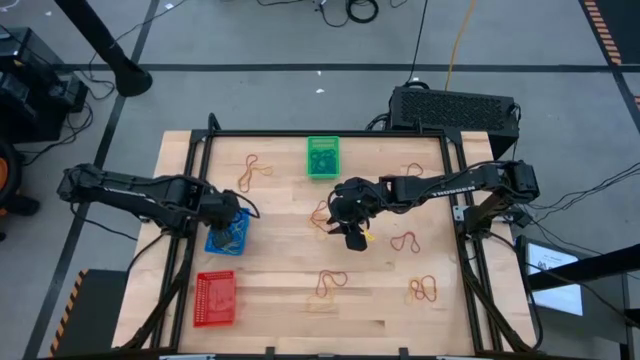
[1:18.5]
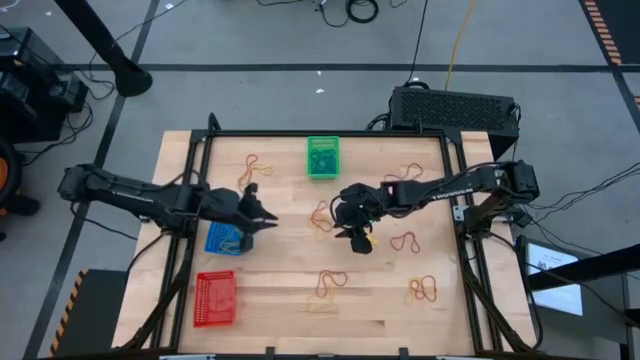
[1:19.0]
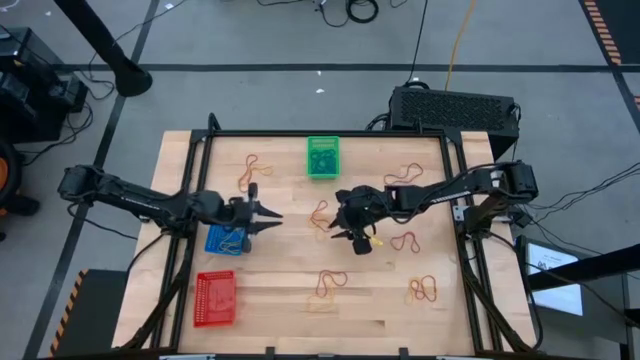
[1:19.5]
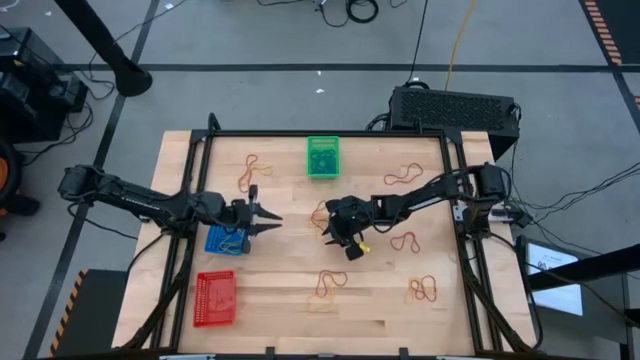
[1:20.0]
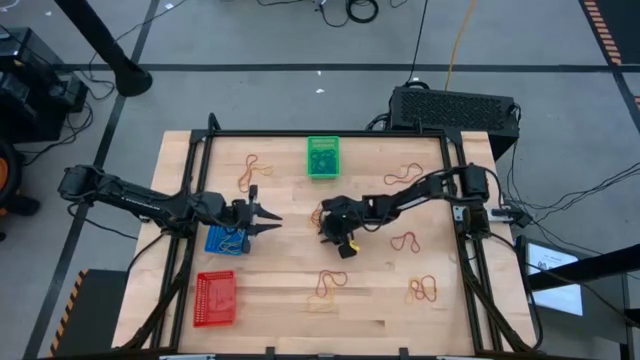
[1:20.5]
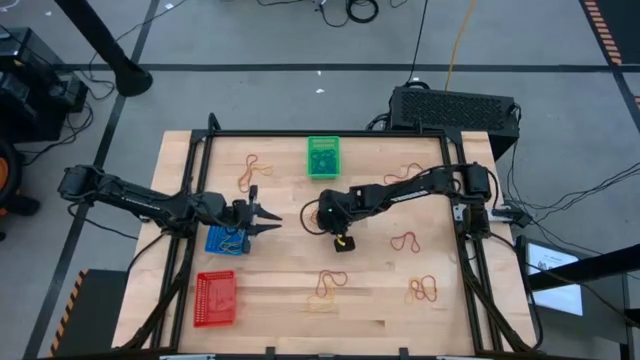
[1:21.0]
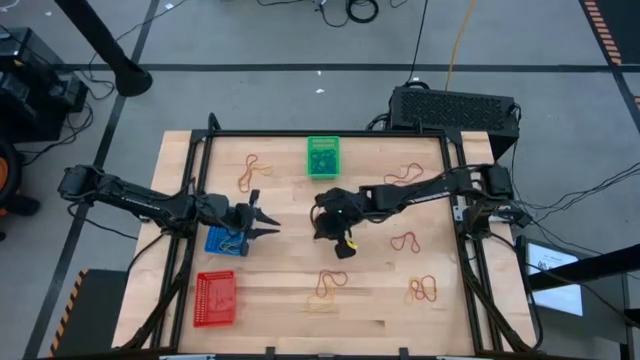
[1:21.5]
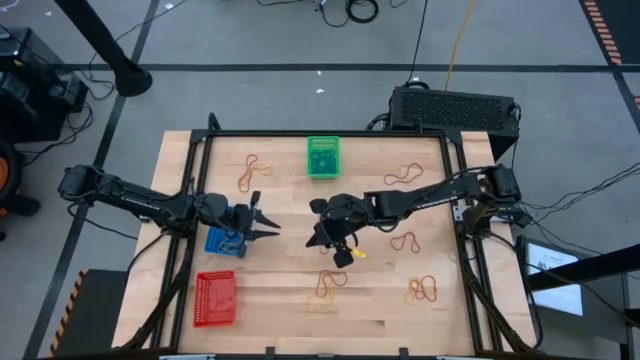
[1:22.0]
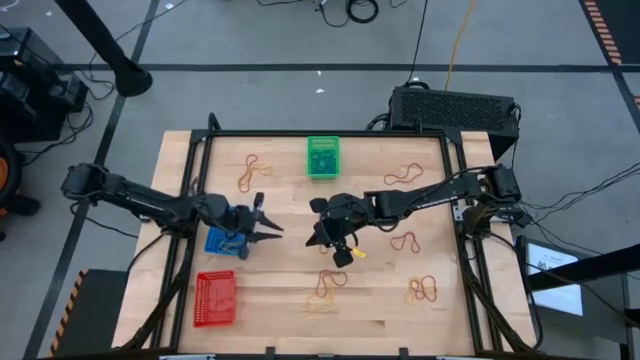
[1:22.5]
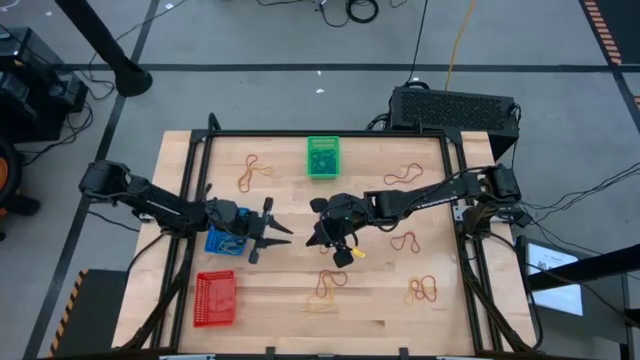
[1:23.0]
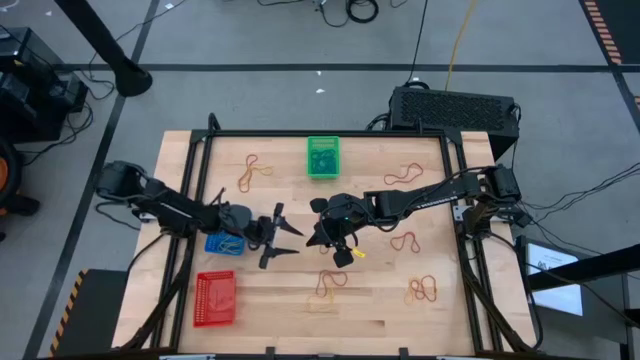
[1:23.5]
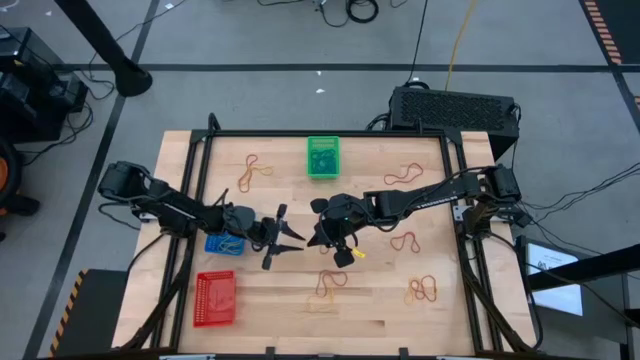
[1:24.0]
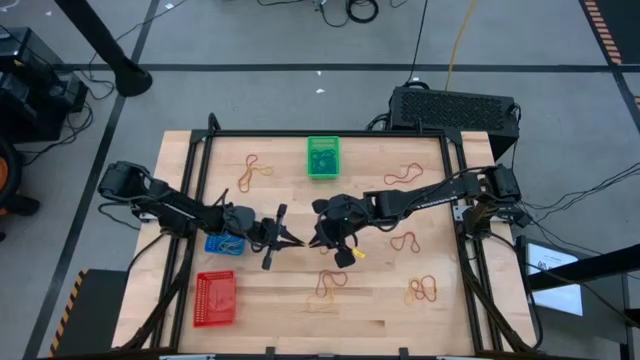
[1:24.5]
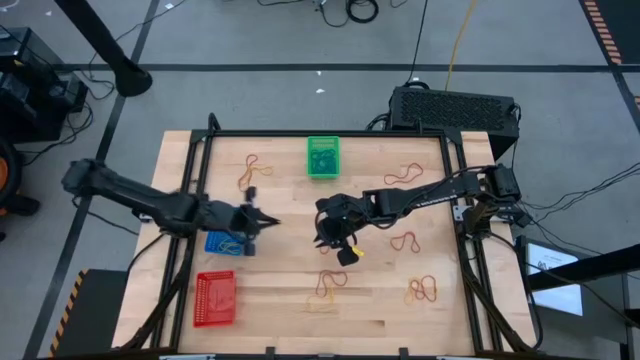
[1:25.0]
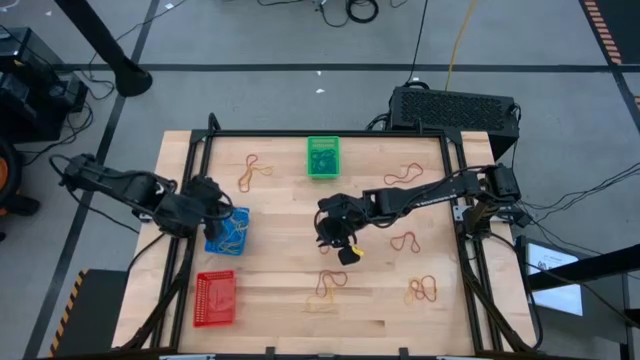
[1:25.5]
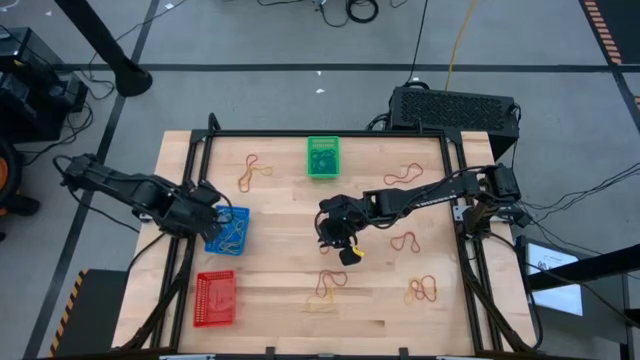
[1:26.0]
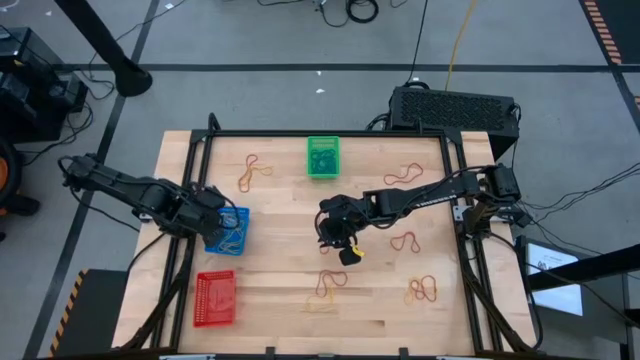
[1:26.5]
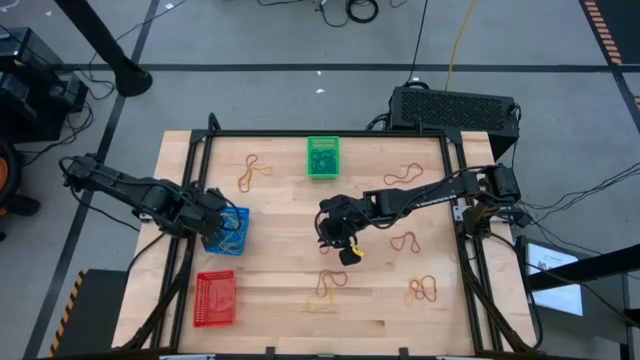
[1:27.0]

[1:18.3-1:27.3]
Task: Sort rubber bands into baskets
Put the yellow rubber band into the blue bin

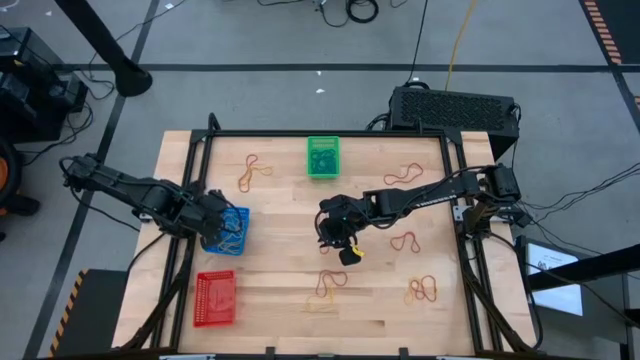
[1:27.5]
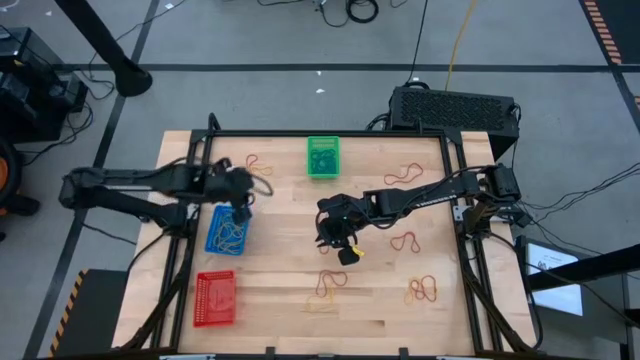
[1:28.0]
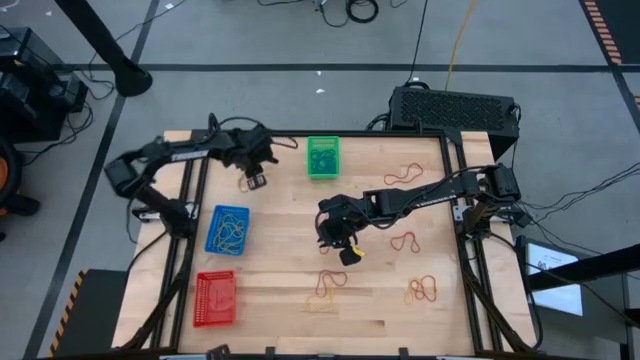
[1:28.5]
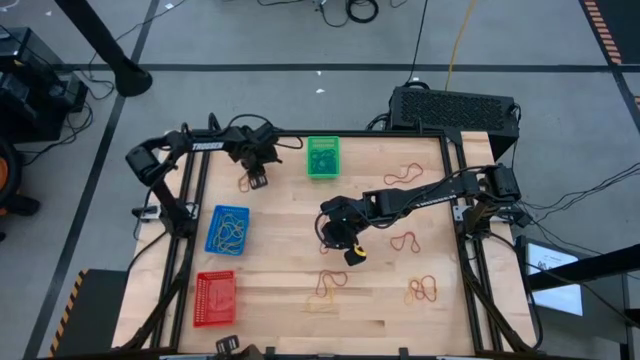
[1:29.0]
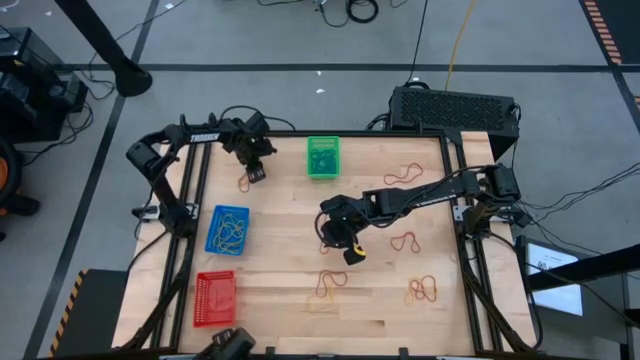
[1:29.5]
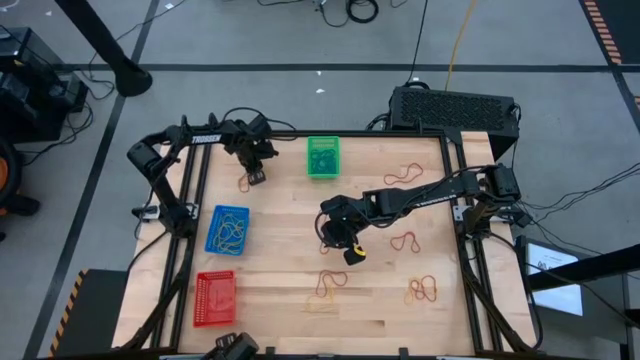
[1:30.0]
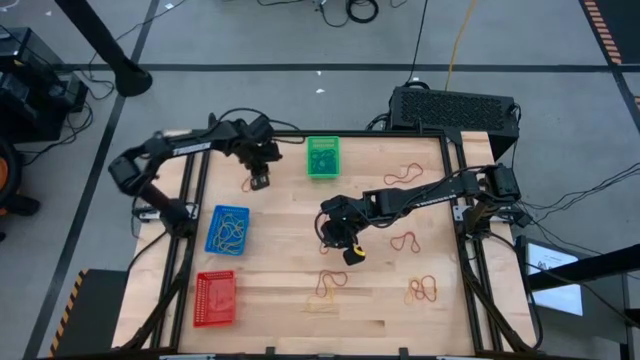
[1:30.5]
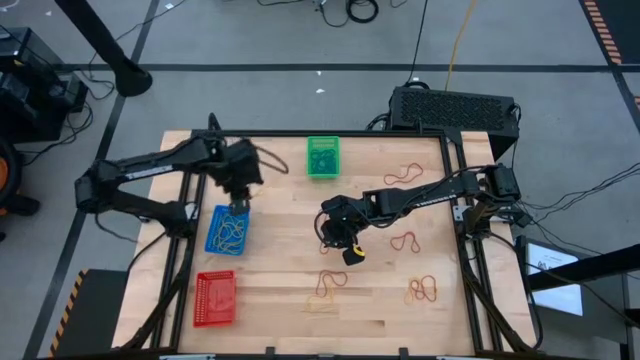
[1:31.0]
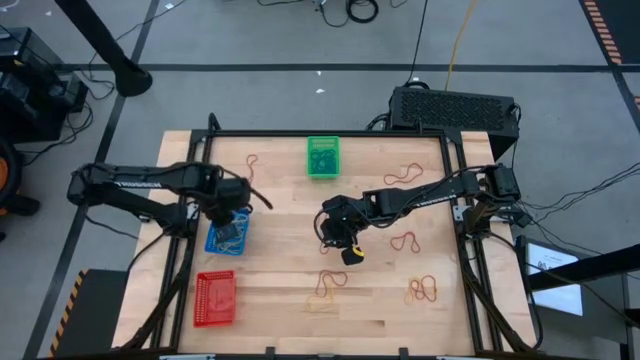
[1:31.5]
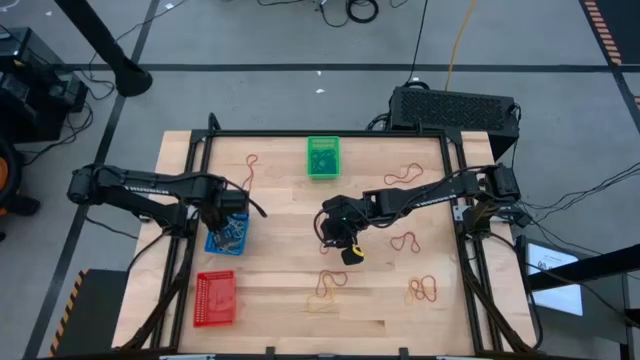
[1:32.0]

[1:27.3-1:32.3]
Put the yellow rubber band into the blue bin

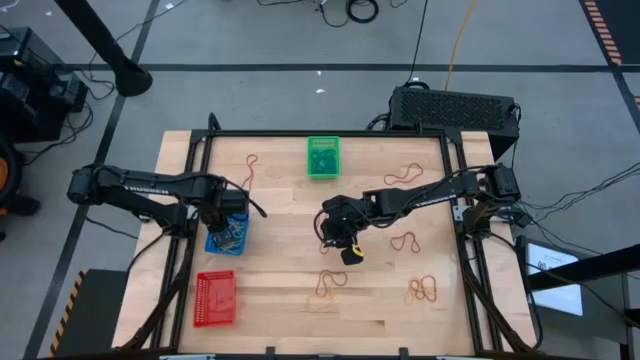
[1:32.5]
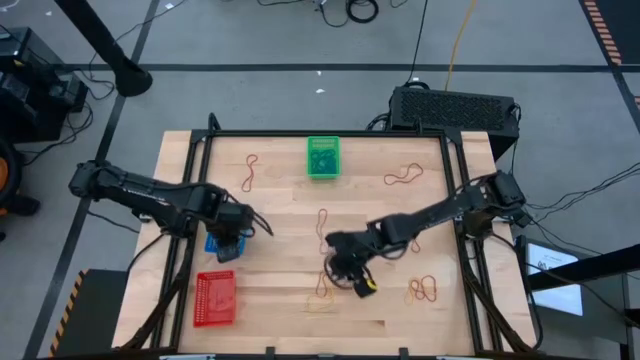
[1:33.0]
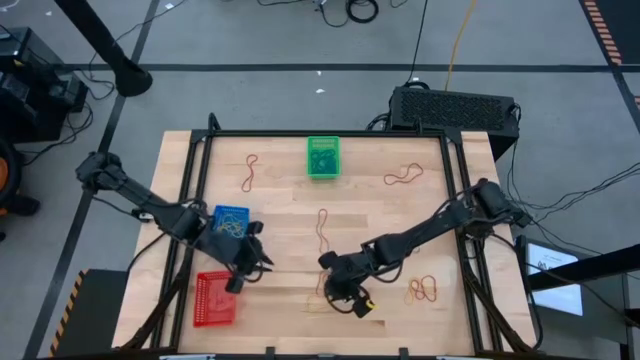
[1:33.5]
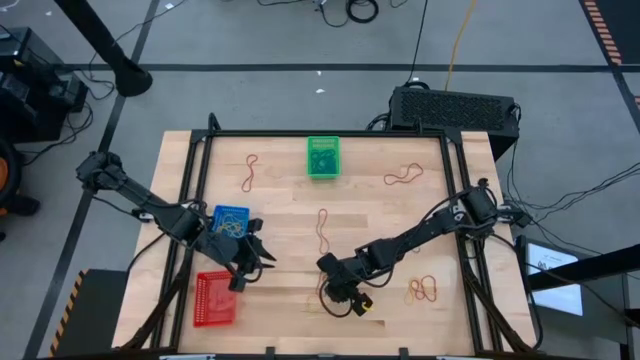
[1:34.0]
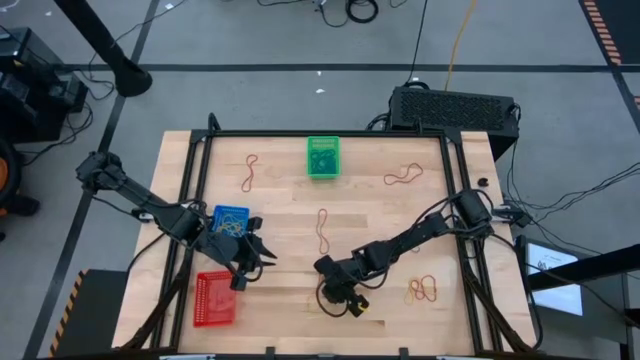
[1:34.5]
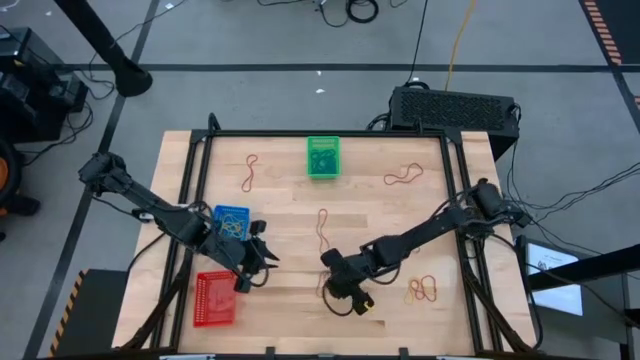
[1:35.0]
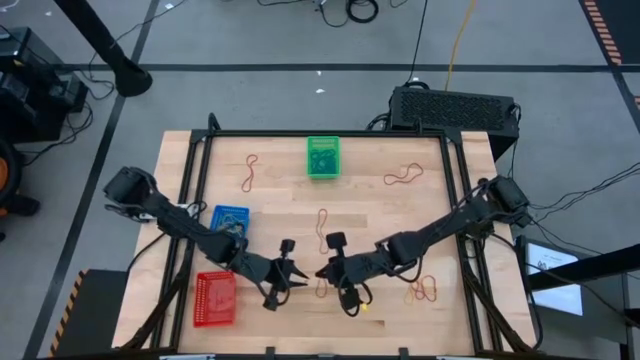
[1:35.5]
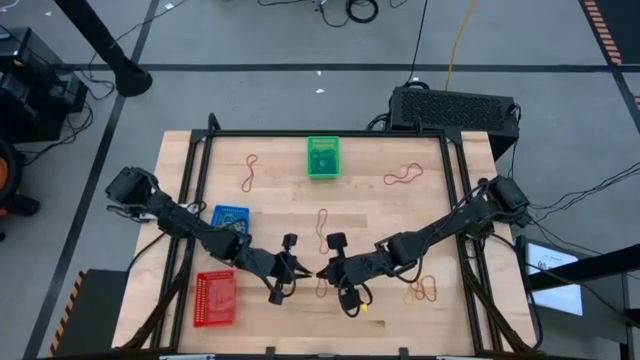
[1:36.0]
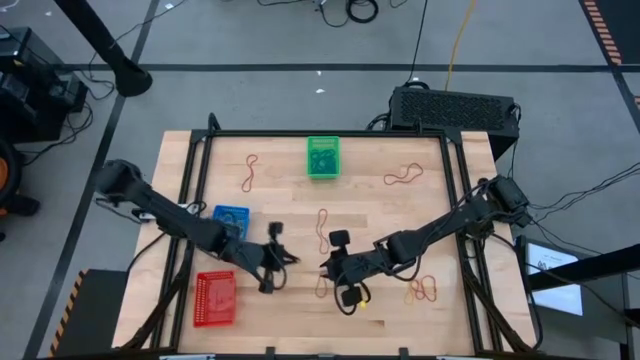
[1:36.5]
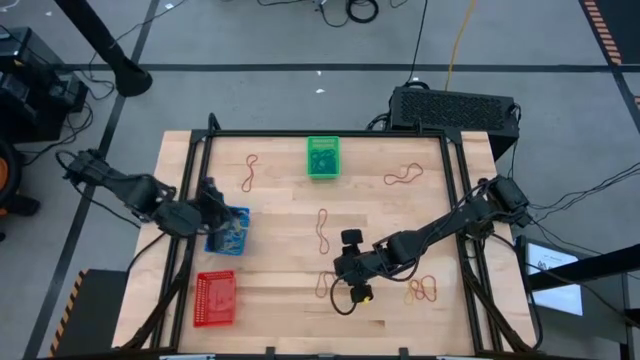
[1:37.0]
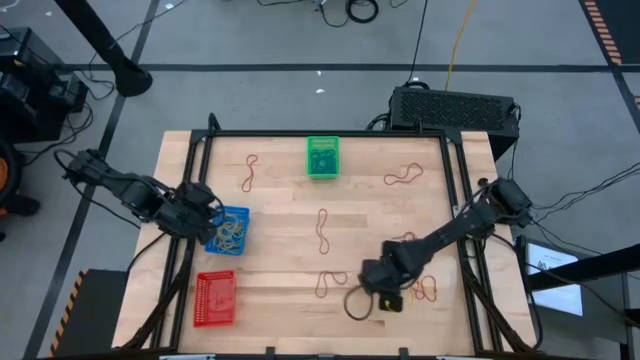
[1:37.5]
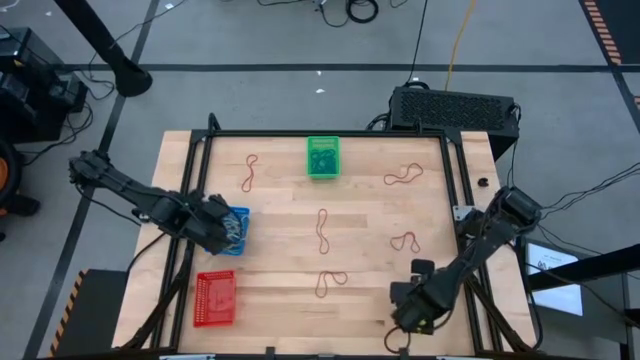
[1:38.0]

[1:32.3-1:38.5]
Put the yellow rubber band into the blue bin

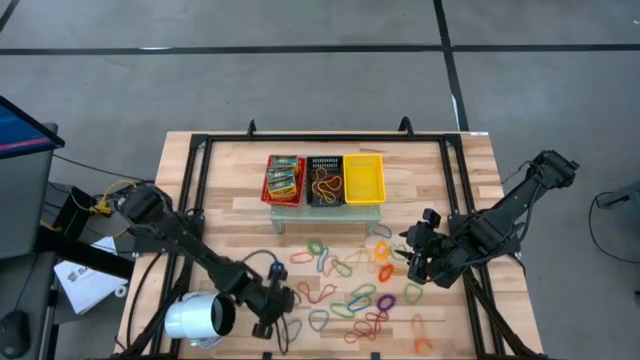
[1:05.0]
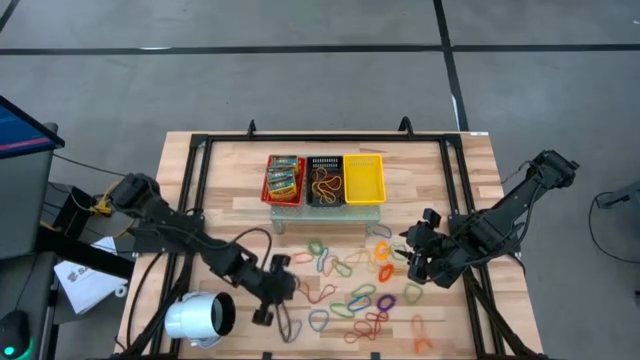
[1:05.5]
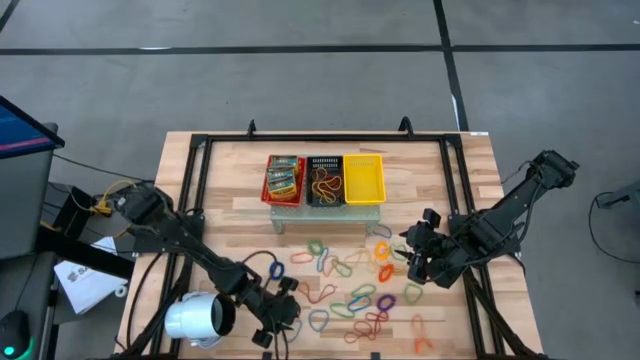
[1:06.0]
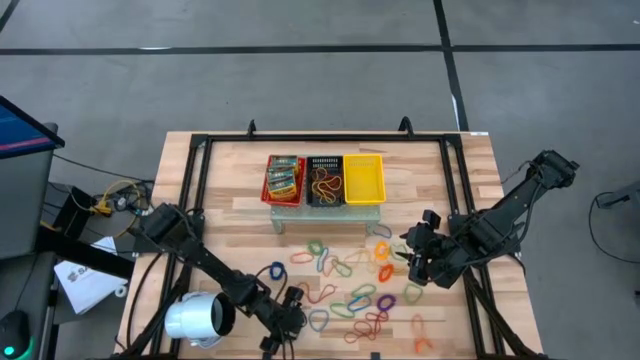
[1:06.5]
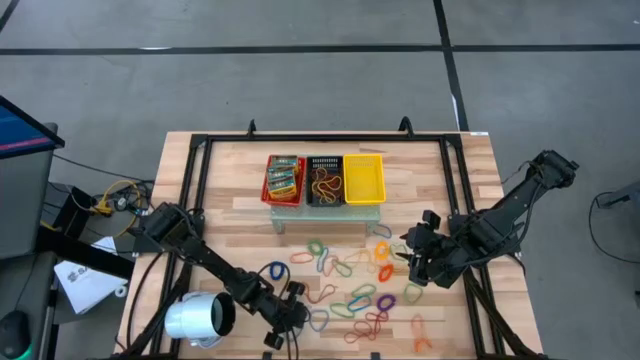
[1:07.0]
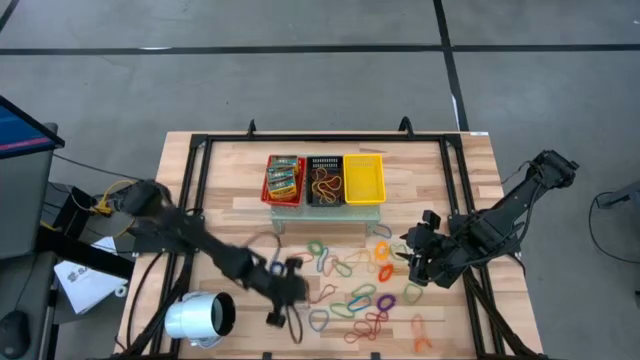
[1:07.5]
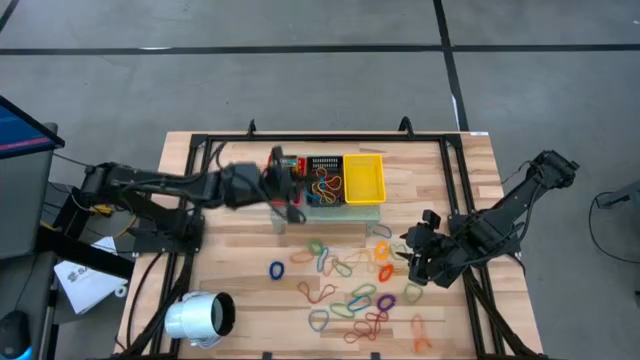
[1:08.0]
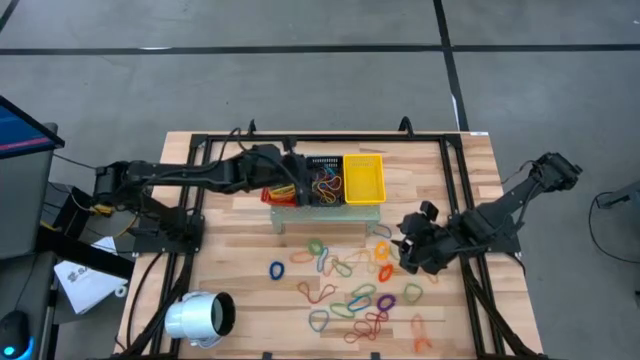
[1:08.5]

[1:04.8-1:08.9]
Task: Pick & Place Office Desk Supplies
Put the blue rubber band into the black bin on the shelf
